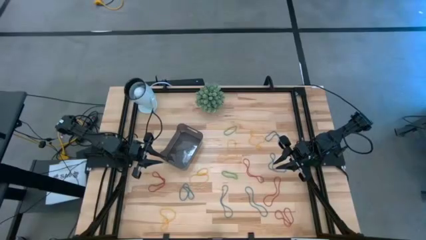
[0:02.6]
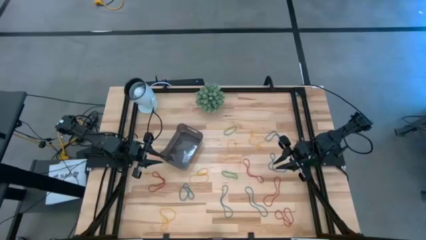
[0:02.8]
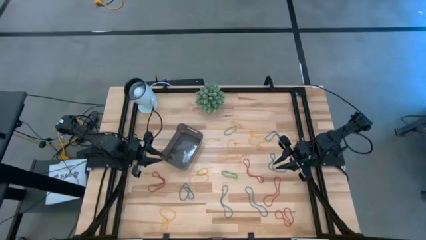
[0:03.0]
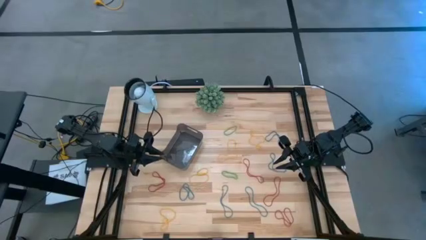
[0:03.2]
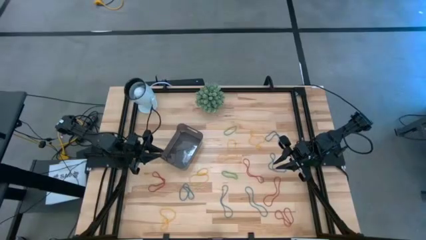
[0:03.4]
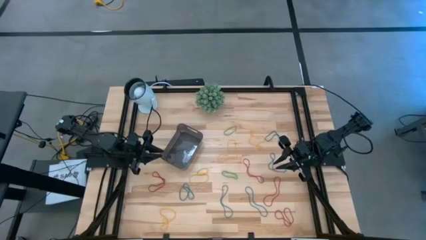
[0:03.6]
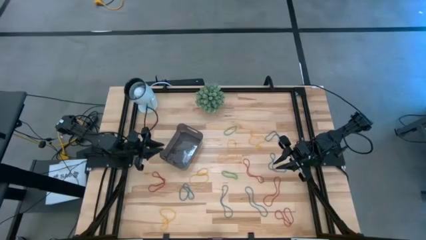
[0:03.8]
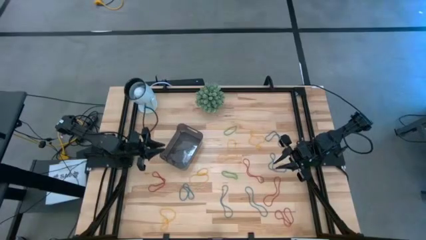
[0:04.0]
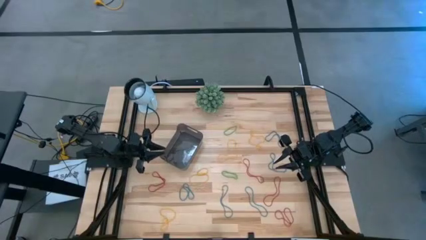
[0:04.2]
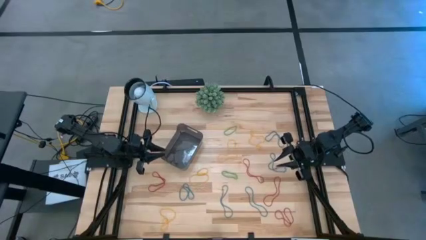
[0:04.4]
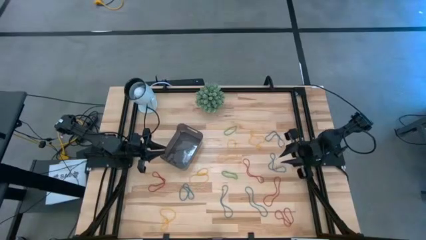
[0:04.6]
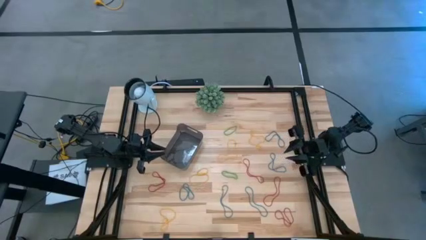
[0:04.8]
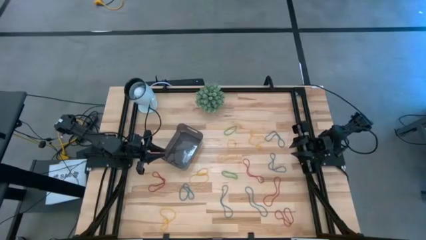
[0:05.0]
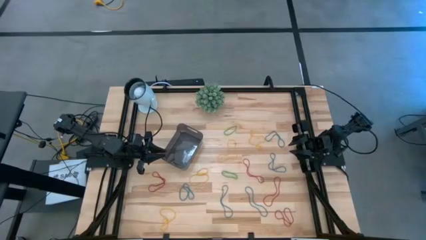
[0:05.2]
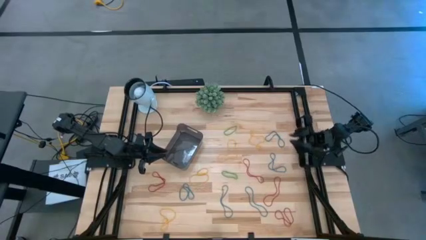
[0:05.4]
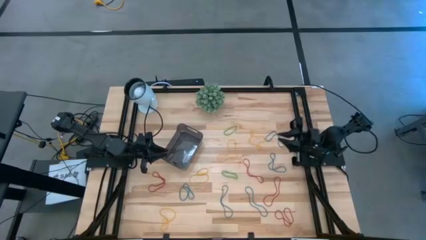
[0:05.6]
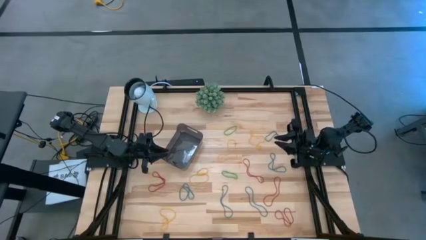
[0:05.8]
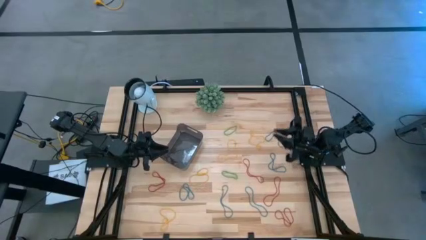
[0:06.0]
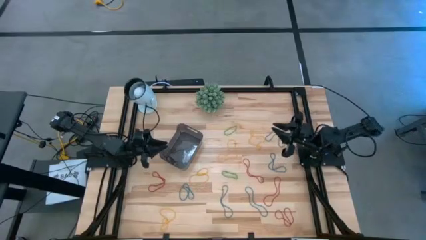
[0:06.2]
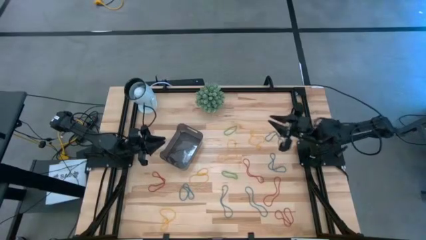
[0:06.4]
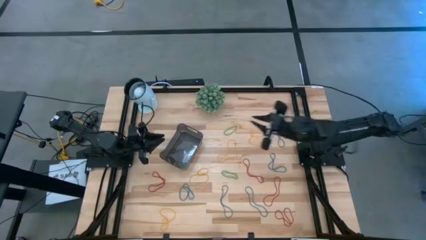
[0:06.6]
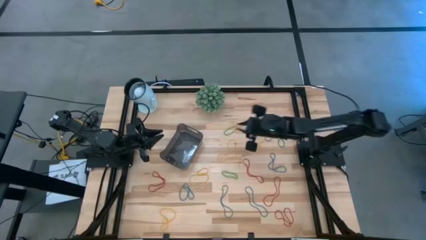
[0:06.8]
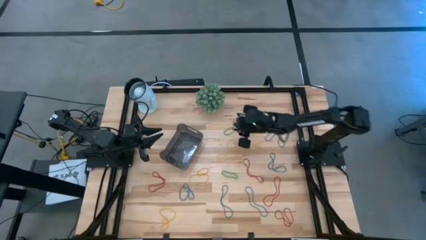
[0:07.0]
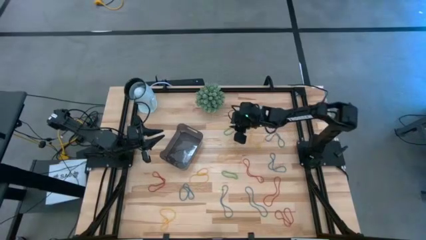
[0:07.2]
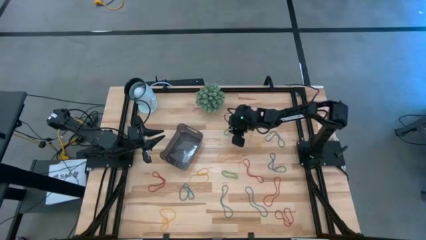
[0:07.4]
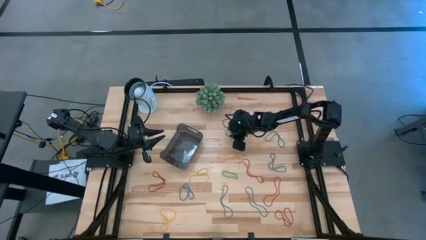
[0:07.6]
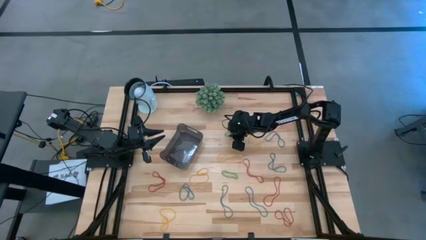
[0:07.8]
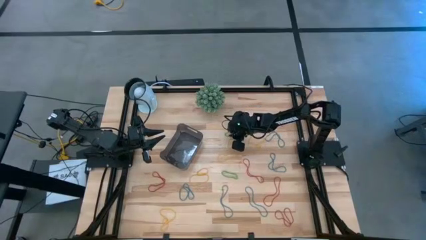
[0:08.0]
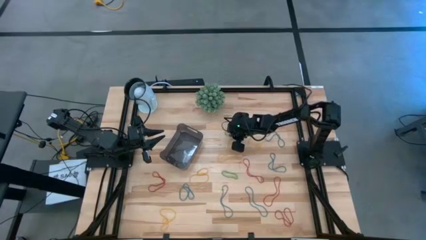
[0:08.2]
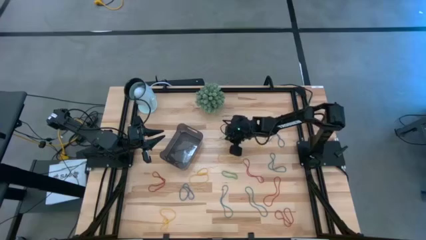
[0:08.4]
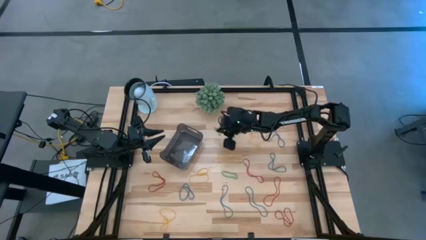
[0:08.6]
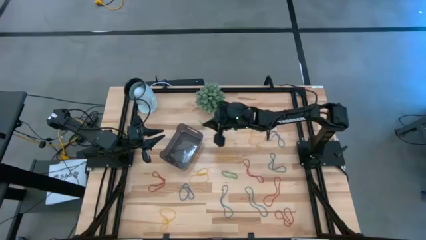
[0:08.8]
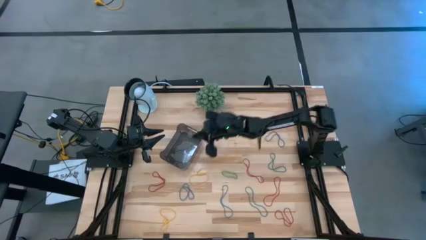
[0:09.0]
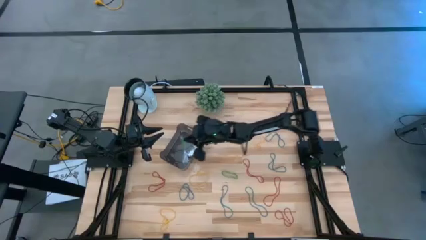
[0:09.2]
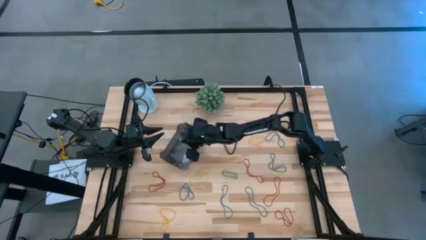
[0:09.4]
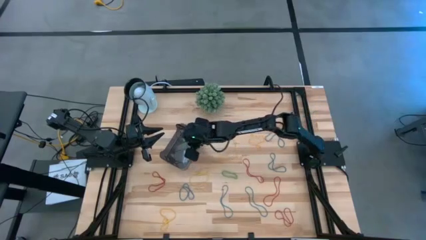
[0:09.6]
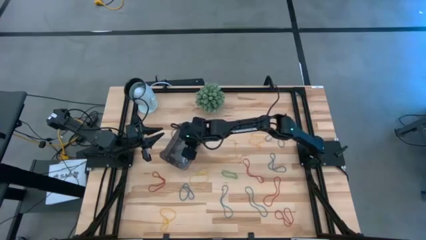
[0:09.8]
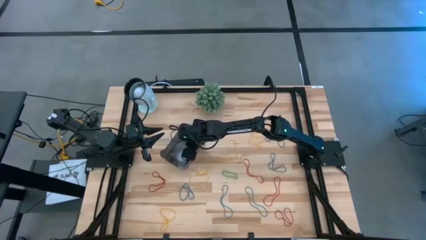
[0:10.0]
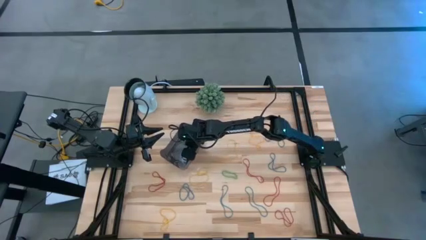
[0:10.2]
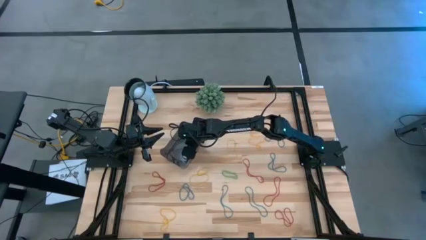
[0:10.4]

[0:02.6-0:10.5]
Task: Pick and place items into bin
Put the green rubber band into the black bin

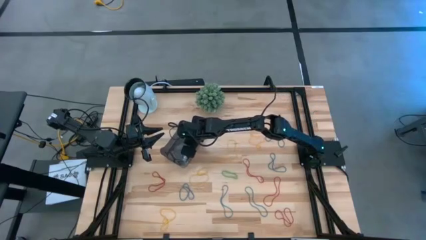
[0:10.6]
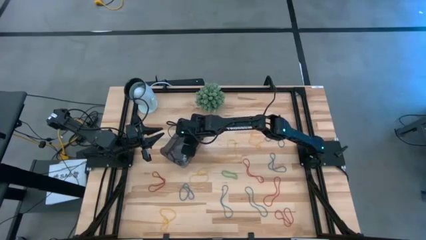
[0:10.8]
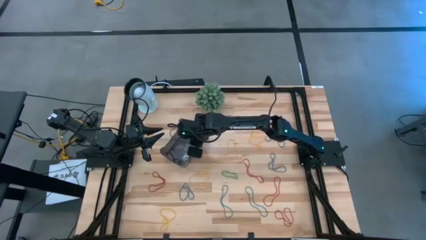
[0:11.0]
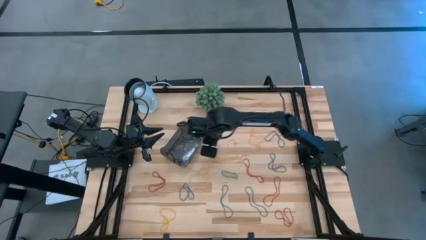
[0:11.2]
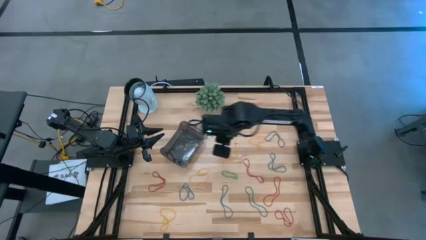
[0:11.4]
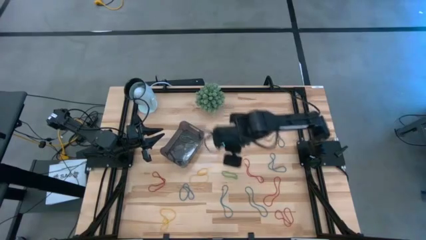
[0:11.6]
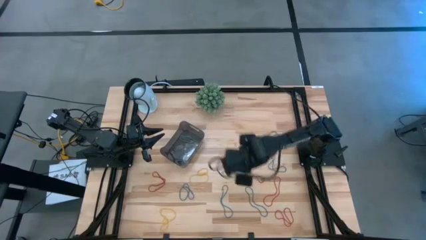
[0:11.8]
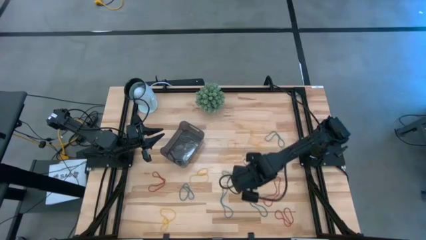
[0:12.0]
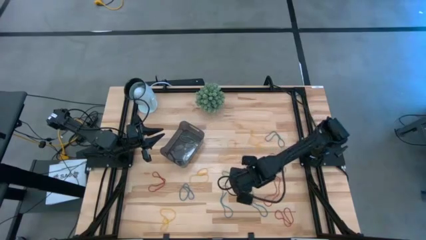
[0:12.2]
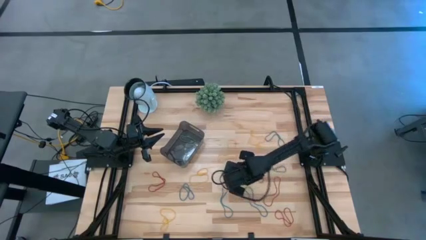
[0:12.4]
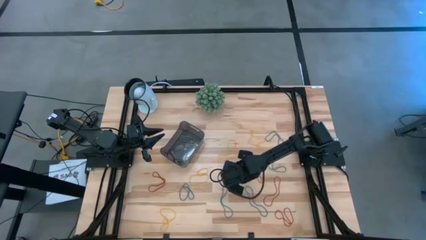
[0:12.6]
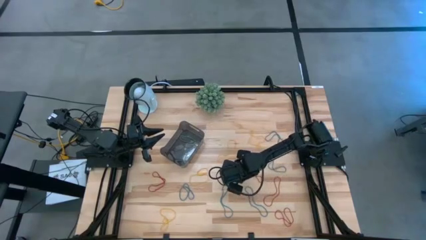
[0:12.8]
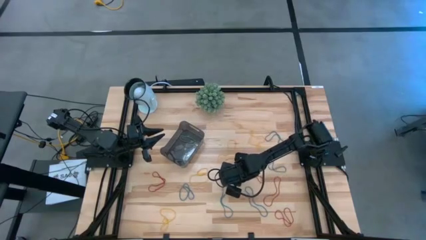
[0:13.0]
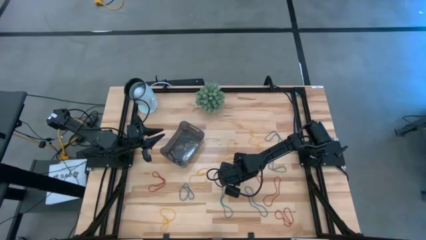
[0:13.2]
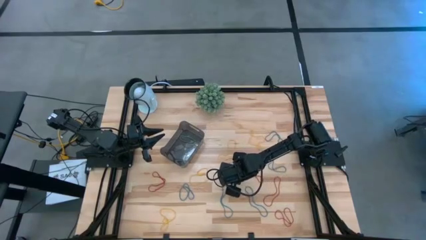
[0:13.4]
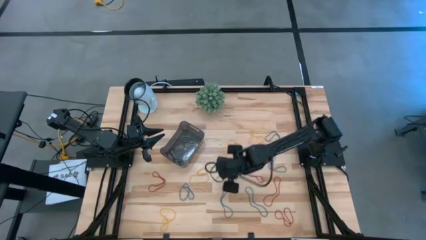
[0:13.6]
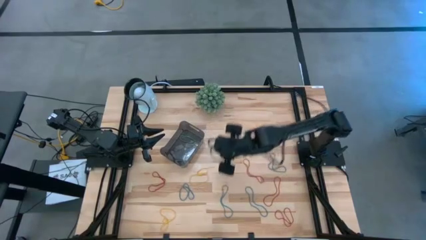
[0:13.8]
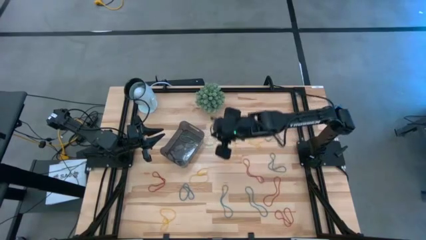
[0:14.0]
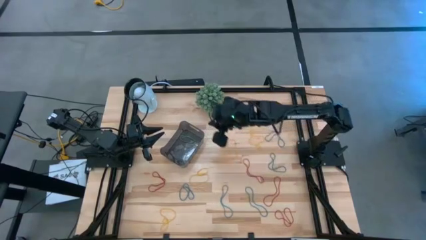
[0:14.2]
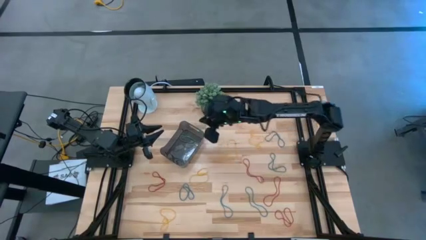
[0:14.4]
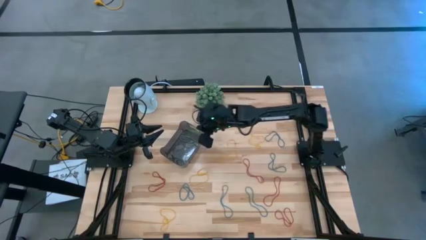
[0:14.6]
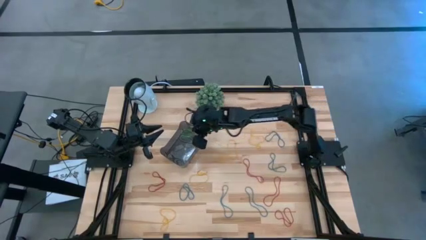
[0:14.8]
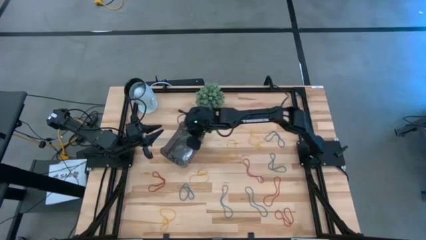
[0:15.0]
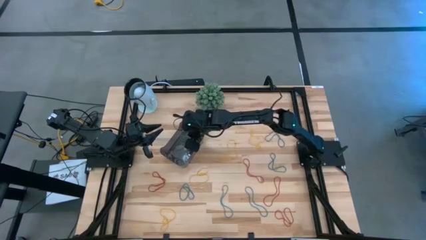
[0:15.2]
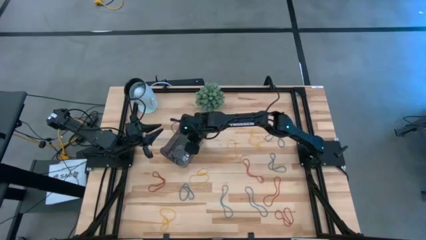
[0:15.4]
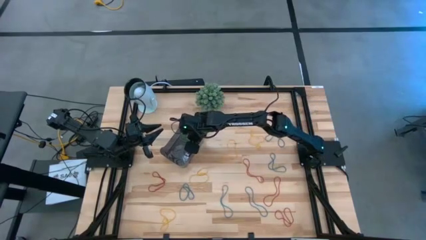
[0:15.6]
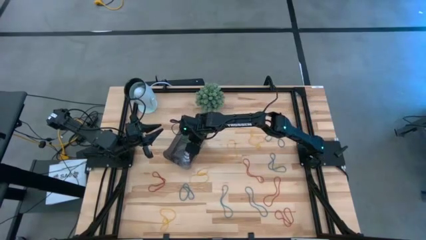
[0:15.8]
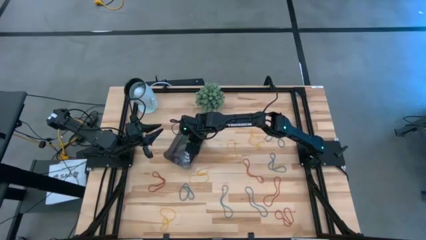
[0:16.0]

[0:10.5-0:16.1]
Put the green rubber band into the black bin

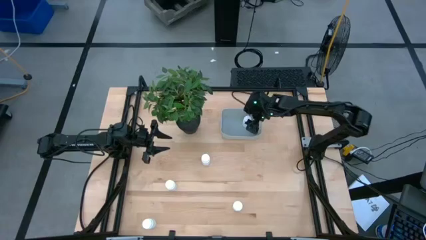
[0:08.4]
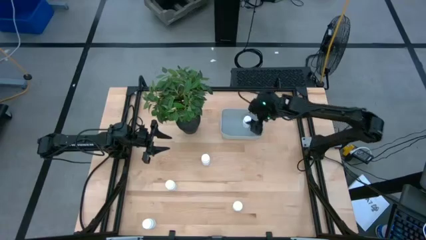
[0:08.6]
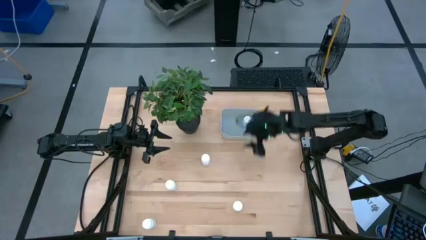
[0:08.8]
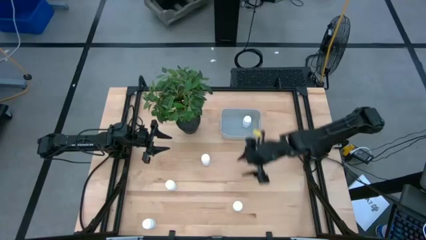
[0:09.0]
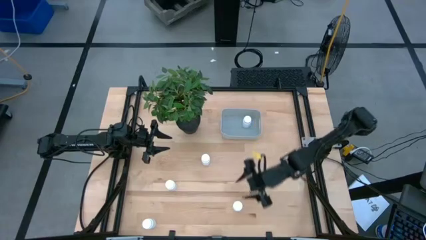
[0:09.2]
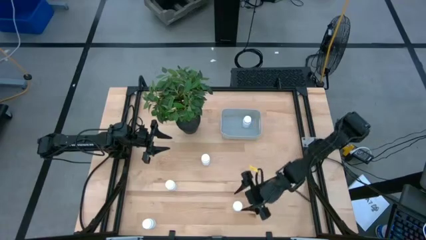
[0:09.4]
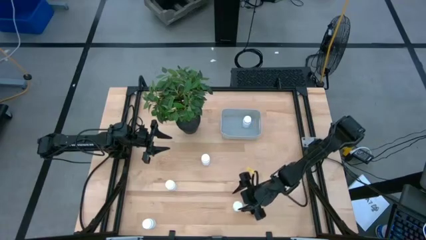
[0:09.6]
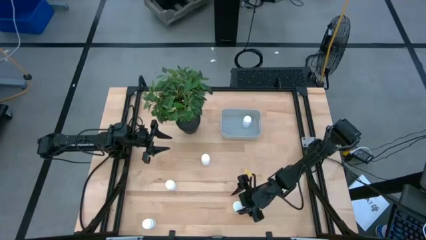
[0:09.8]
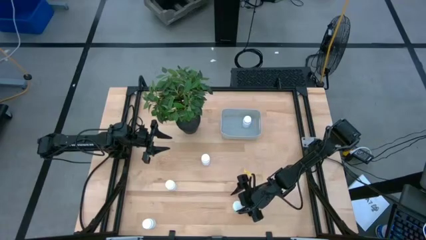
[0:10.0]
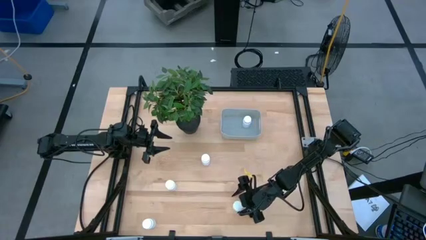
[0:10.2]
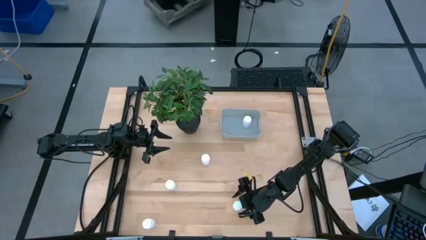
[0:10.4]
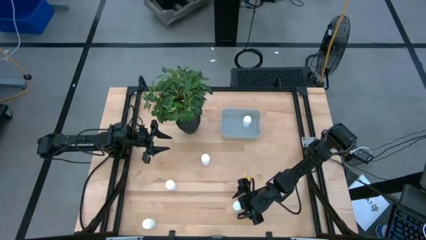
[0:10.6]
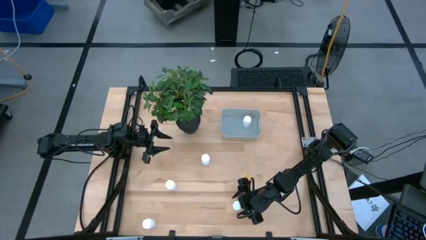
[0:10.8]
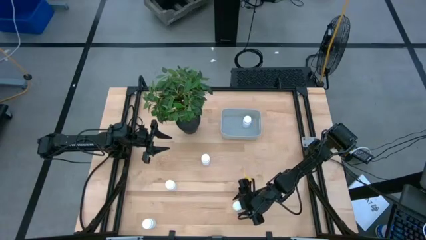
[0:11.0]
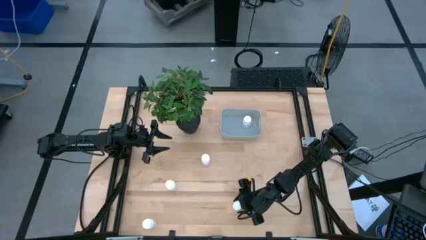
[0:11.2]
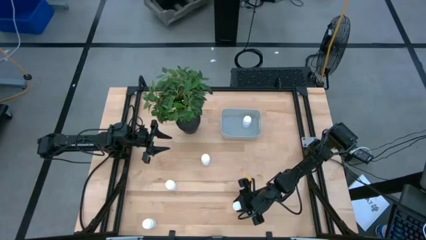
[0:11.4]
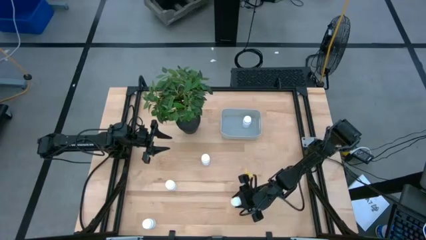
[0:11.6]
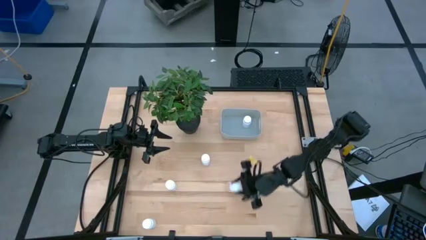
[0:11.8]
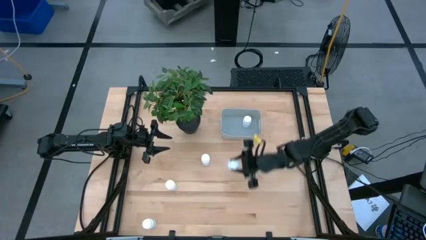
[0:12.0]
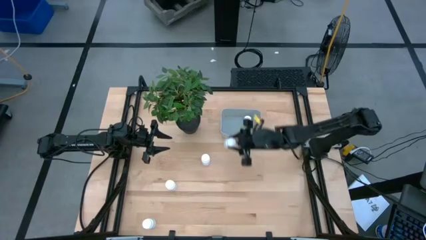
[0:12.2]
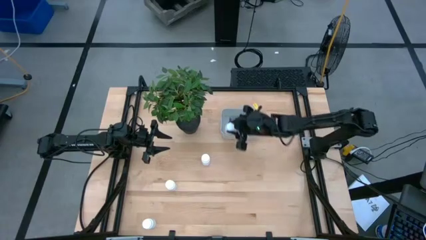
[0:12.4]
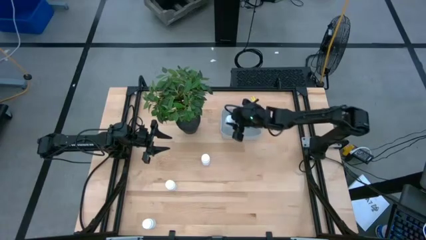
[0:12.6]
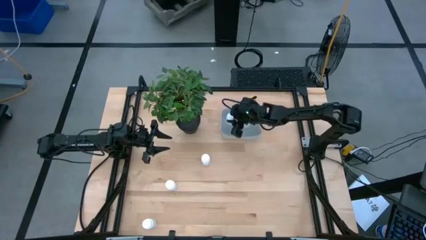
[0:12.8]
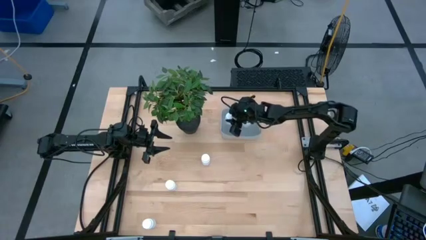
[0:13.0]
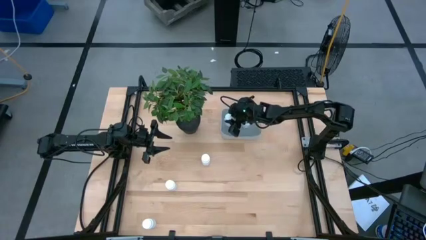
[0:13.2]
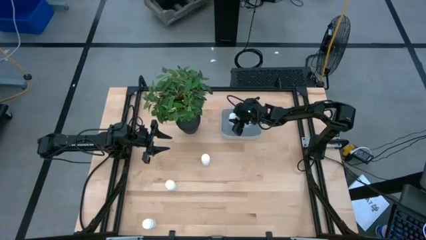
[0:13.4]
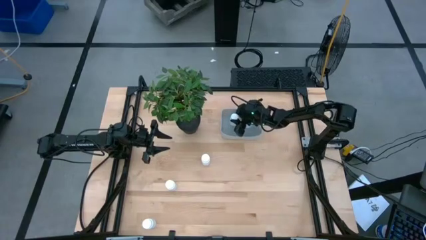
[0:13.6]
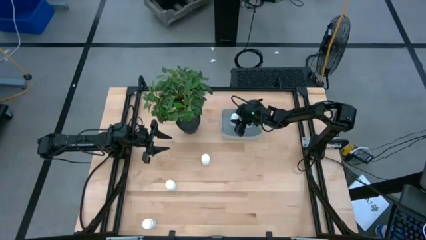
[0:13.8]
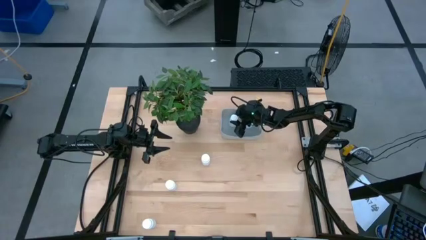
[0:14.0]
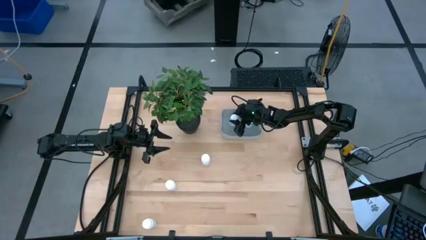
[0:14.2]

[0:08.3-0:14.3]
Task: Pick and place pill bottles into a basket
Put the white pill bottle into the gray bin
